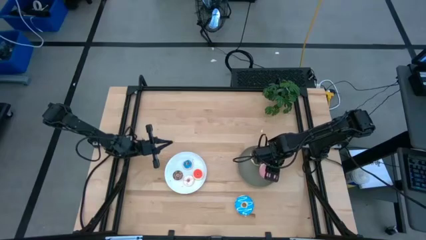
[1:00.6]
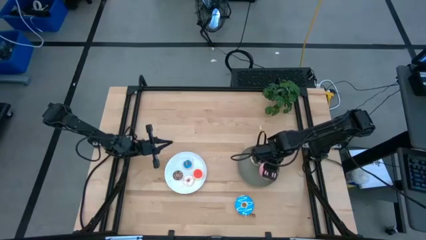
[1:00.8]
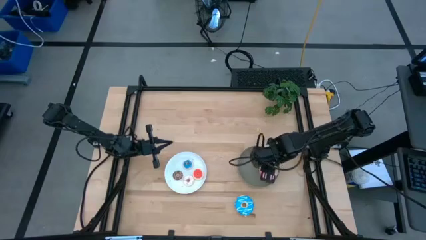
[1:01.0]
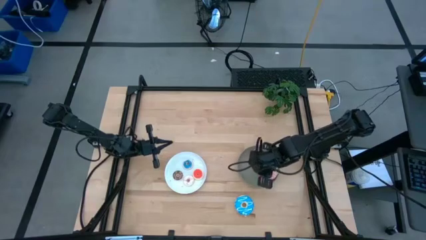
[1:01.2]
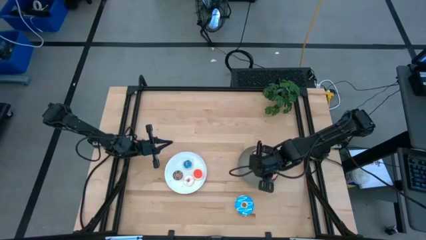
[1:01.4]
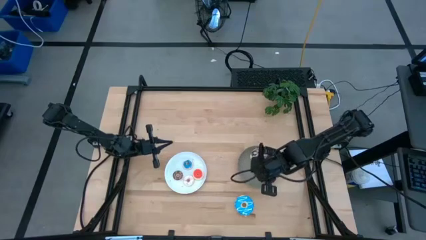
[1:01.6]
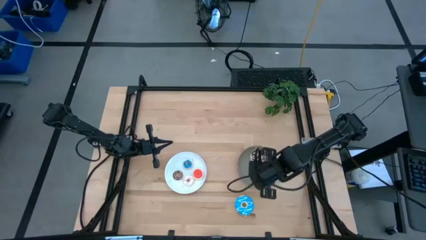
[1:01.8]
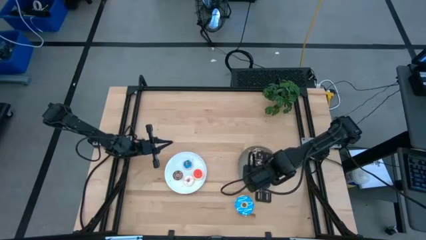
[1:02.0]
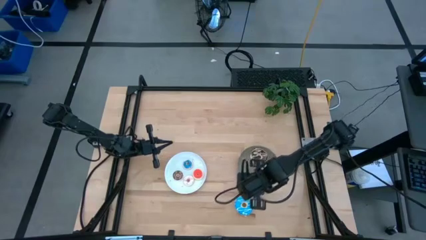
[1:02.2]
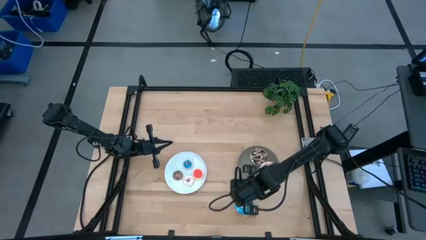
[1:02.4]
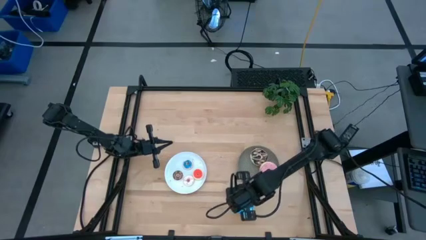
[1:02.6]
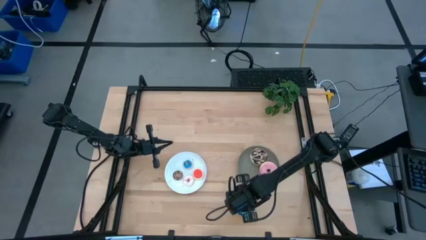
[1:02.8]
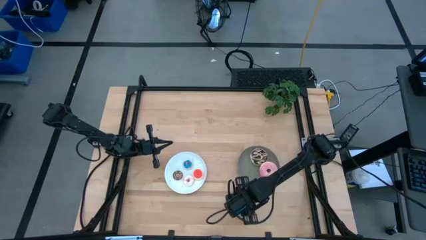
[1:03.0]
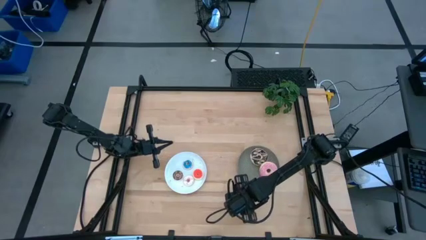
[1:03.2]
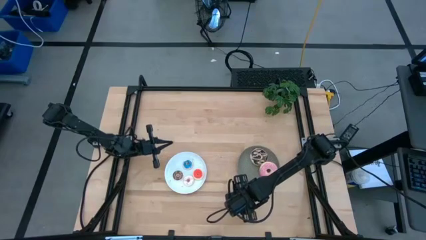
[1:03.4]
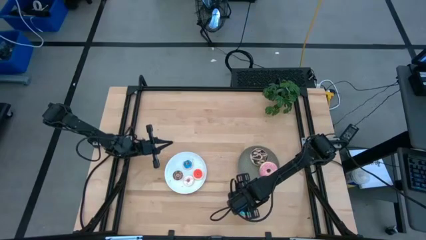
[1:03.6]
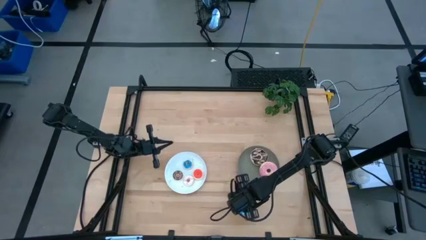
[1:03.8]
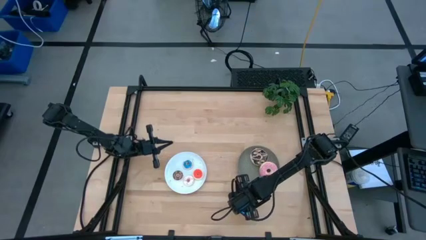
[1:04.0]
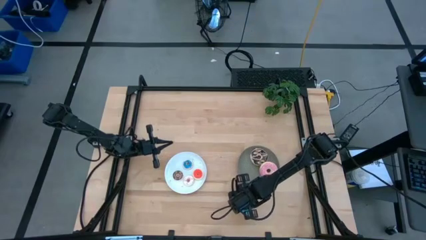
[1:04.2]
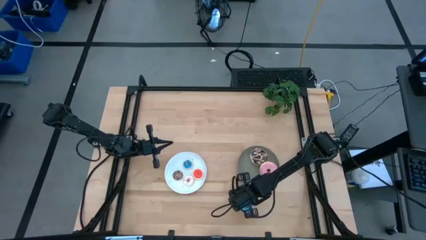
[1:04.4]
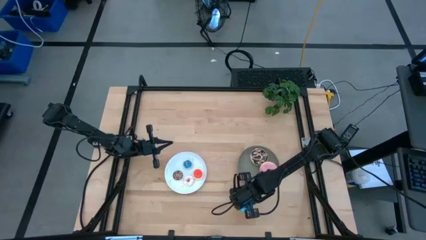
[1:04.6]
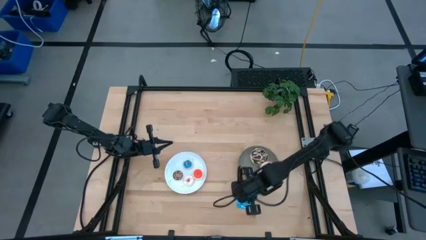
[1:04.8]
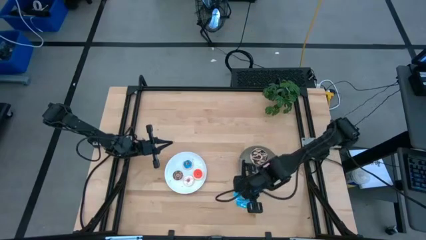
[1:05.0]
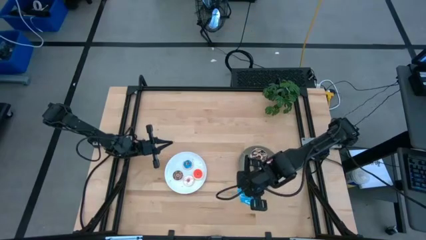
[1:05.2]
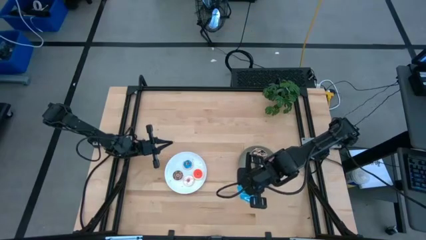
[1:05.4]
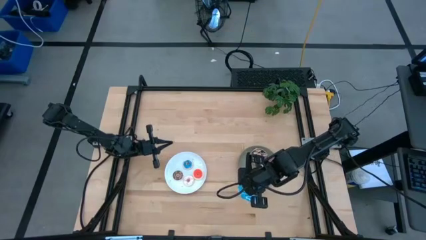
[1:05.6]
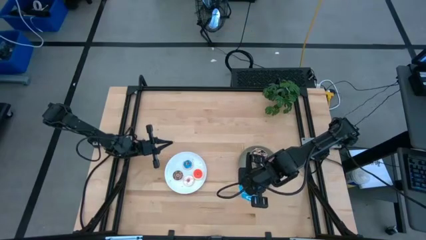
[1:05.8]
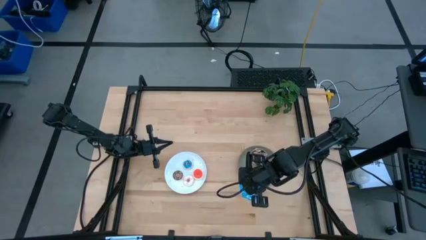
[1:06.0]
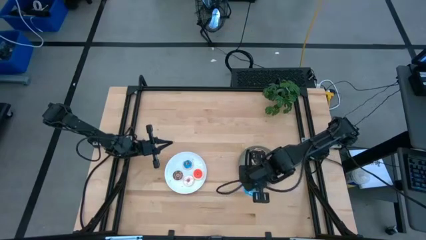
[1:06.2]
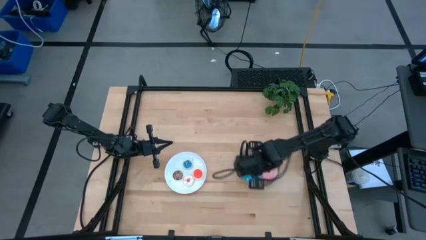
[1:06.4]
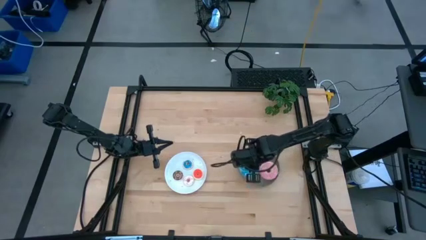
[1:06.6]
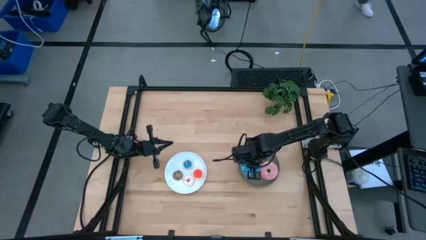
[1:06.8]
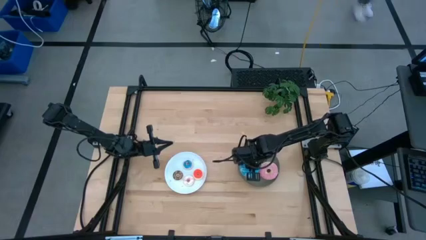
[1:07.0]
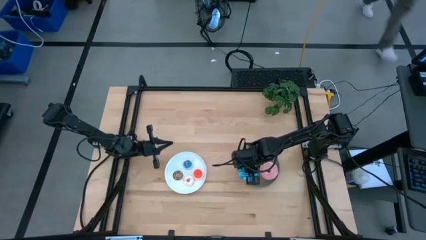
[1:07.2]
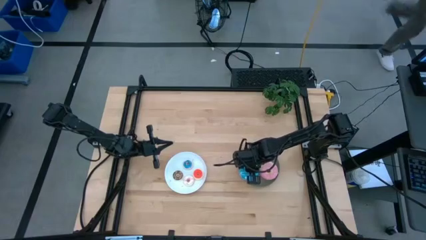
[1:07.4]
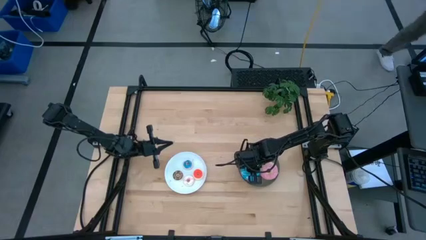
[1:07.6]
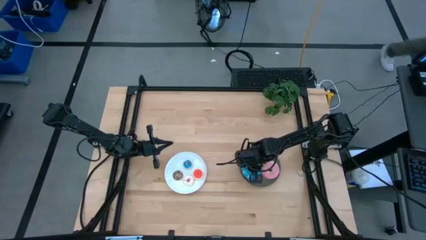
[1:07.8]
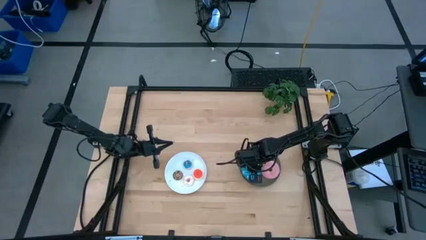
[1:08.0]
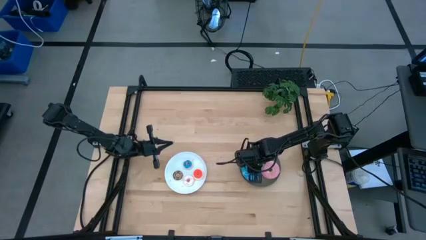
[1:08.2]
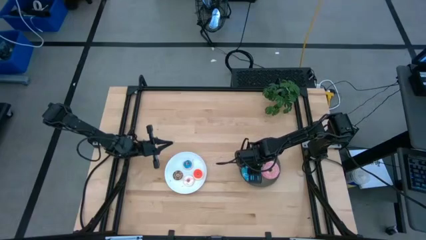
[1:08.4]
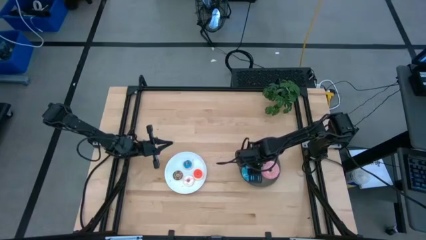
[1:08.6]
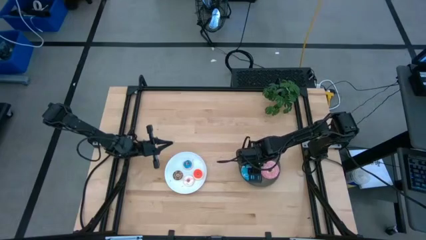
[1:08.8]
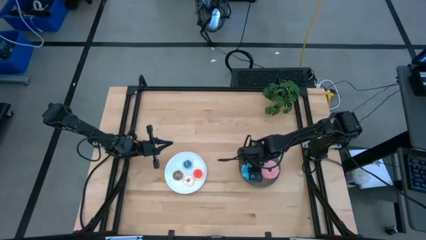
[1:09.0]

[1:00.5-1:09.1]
Task: Pick & Place donuts
Put the large blue donut on the gray plate

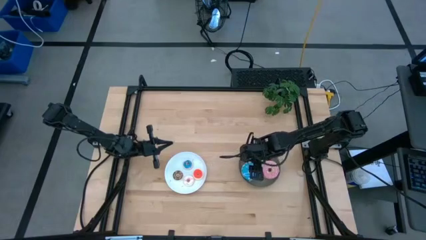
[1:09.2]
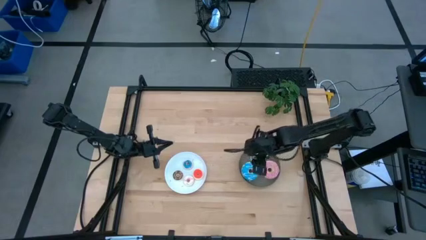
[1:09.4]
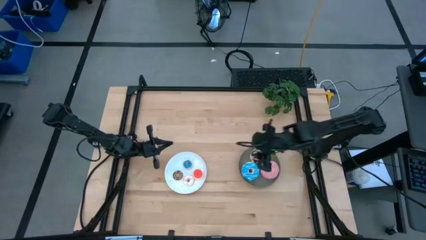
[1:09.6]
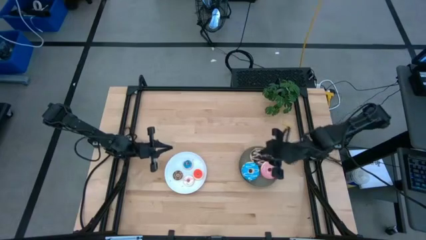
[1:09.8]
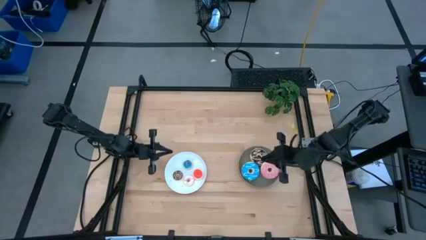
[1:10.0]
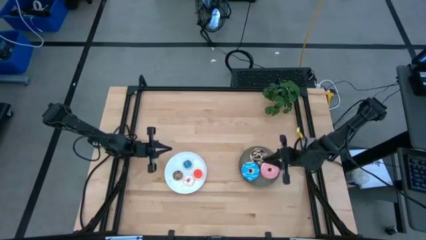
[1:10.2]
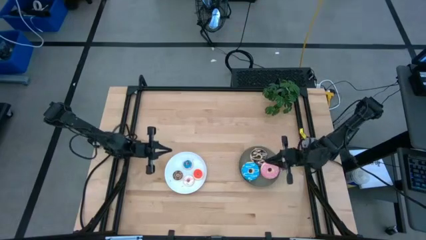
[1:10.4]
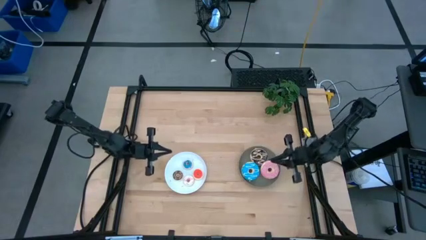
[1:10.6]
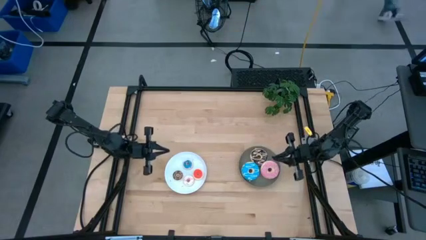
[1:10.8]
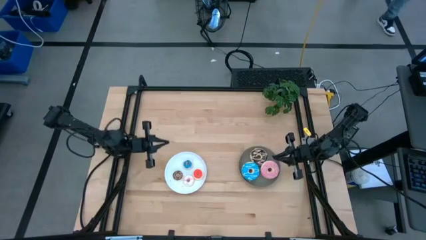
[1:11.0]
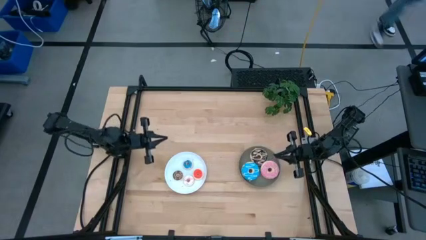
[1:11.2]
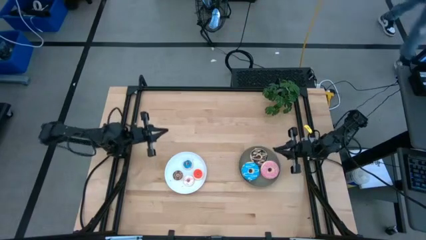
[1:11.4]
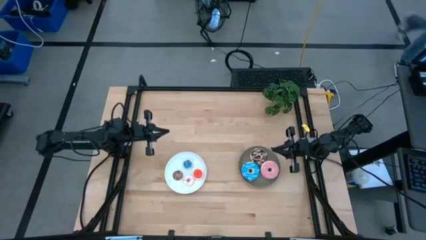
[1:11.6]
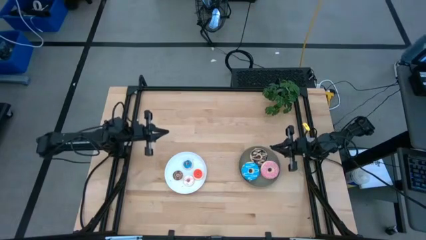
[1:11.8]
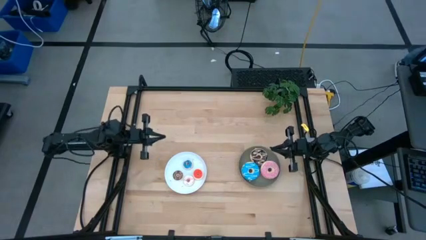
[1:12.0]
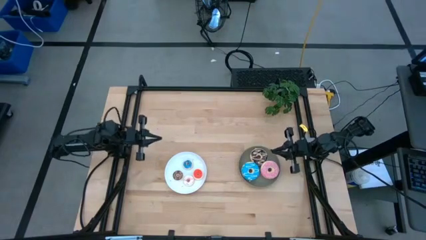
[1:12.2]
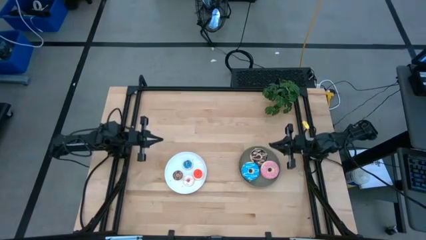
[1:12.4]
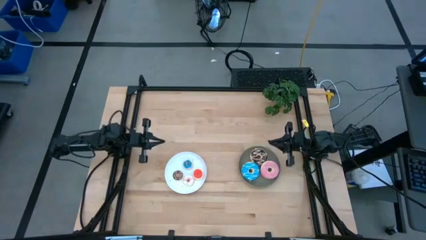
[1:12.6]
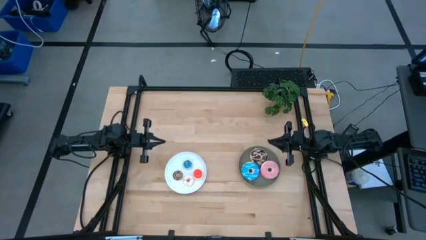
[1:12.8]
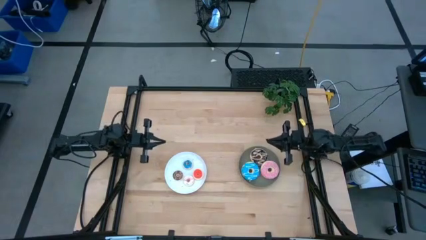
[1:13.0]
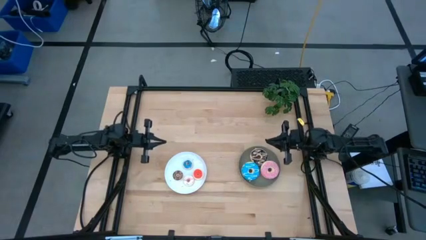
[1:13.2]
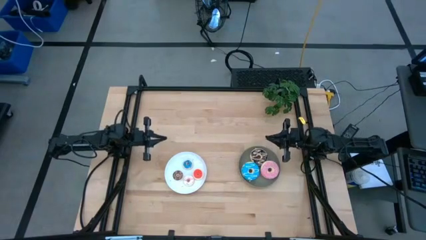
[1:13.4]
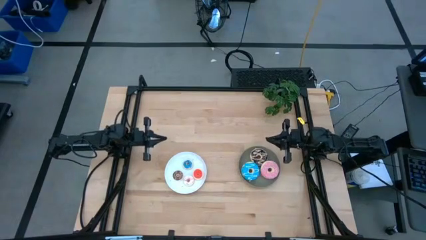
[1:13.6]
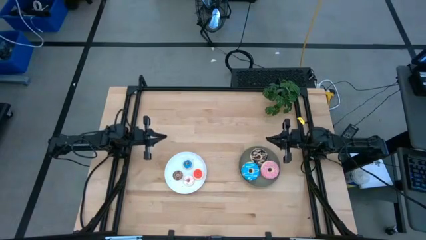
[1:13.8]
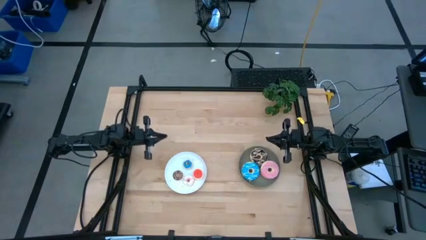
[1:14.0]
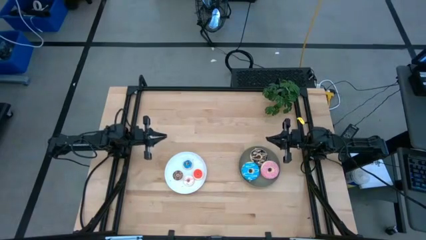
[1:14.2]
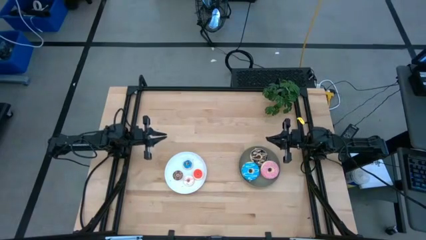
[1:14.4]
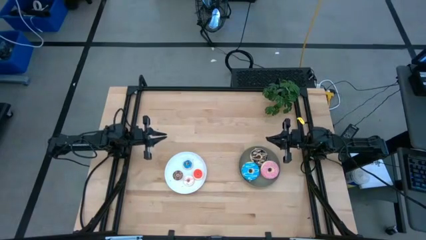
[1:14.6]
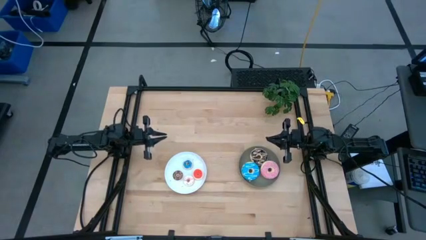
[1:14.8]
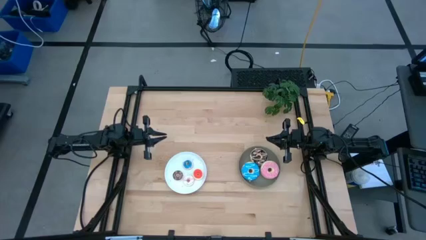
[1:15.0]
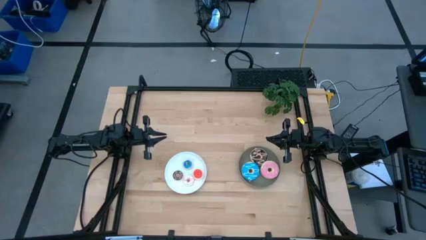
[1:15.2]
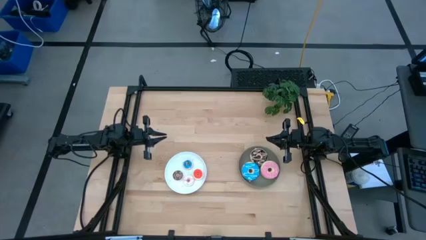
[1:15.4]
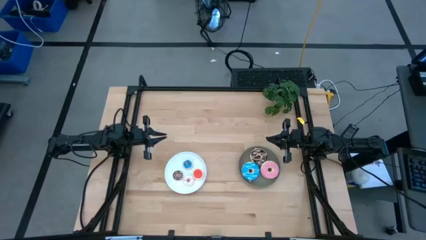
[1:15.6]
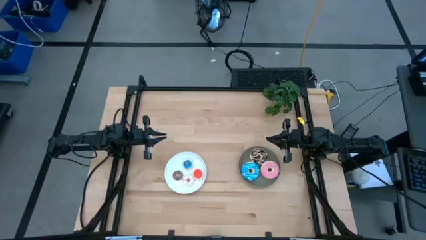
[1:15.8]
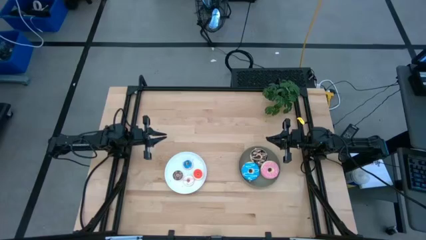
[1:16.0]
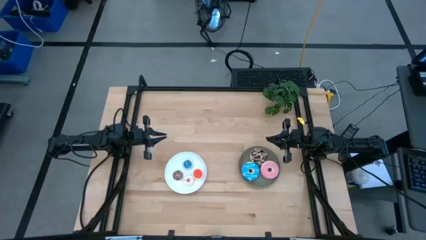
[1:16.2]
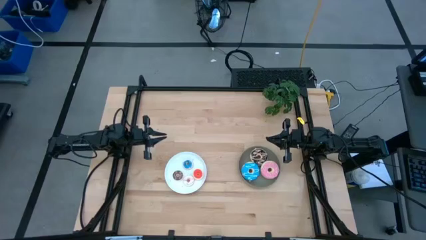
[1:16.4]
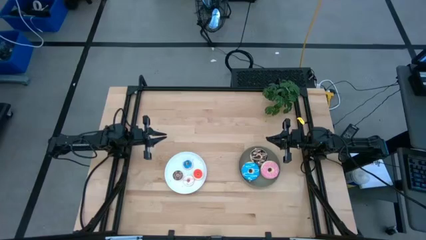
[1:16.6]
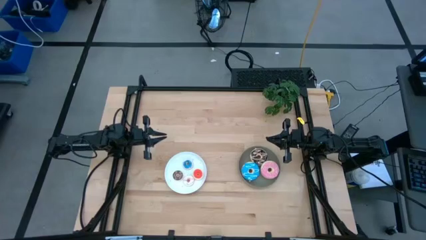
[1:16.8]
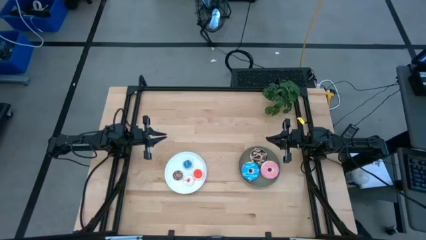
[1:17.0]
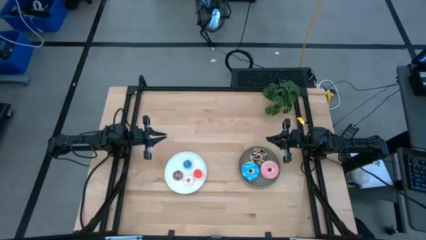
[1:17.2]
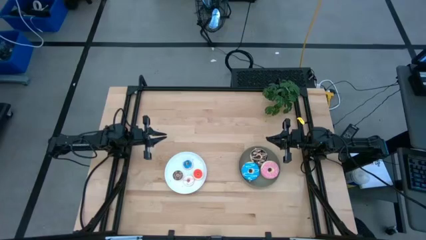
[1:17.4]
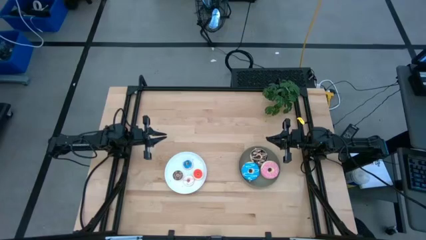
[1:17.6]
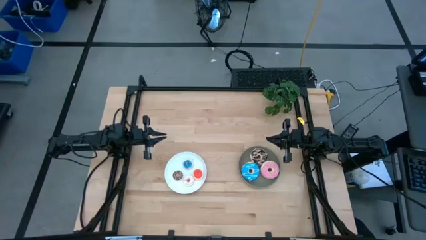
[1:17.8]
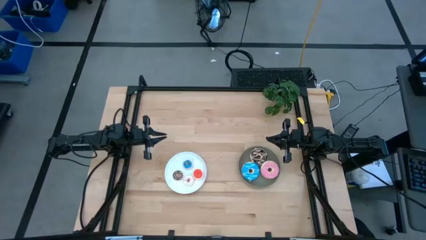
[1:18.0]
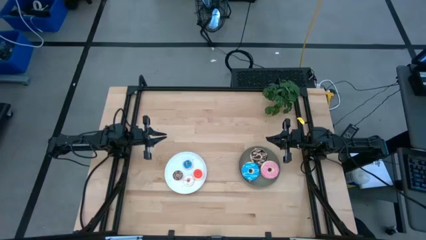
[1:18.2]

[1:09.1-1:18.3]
Return to Home Position

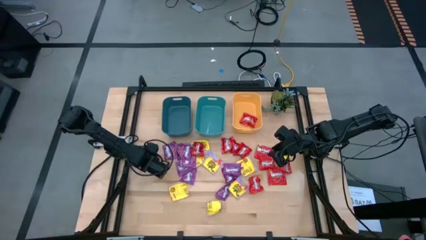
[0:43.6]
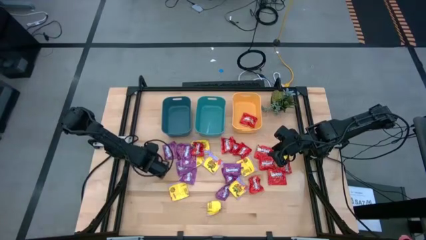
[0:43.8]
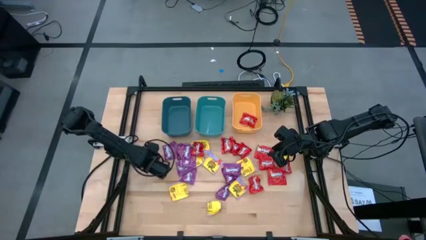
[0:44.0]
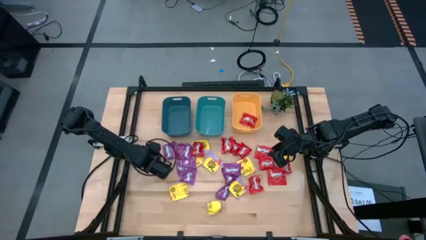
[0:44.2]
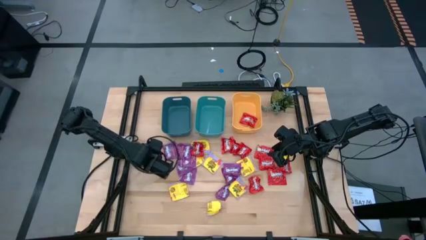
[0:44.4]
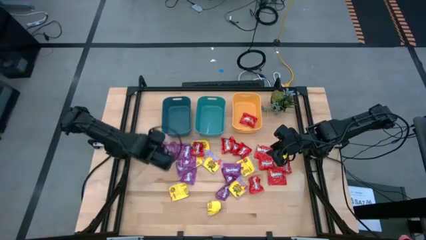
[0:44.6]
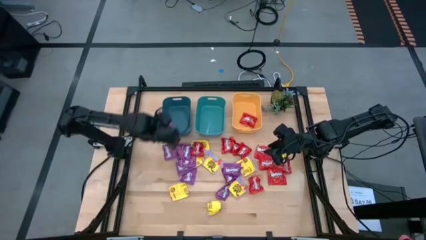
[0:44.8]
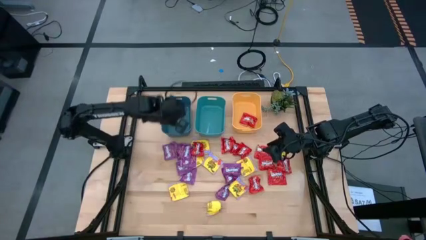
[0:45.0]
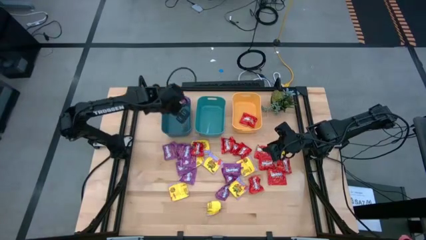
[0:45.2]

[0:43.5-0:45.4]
Task: Sort candy
Put the violet candy into the blue bin
